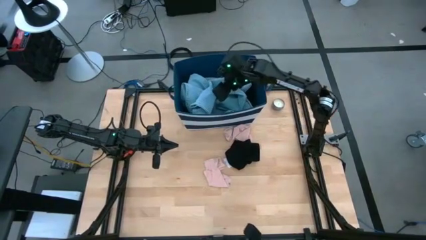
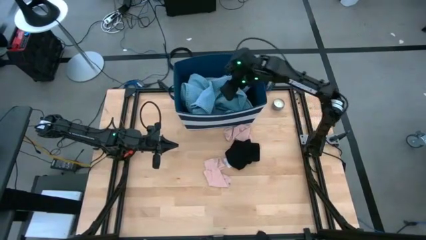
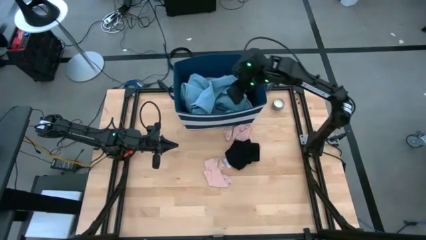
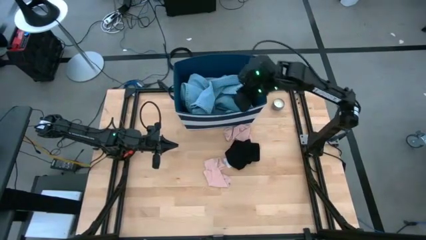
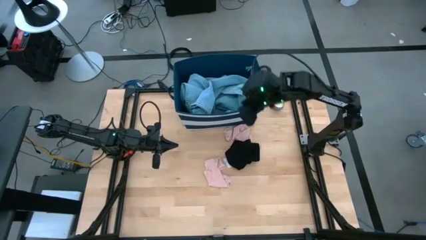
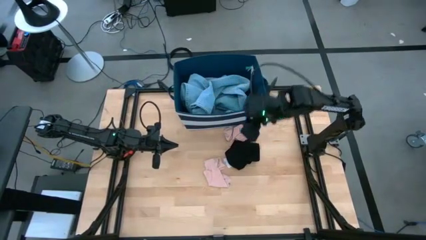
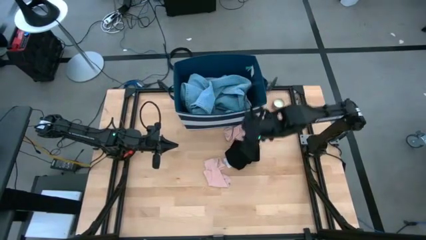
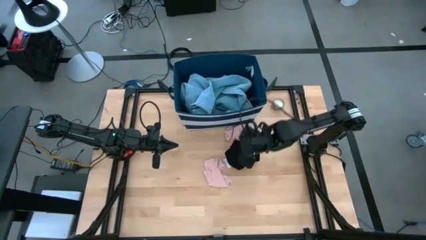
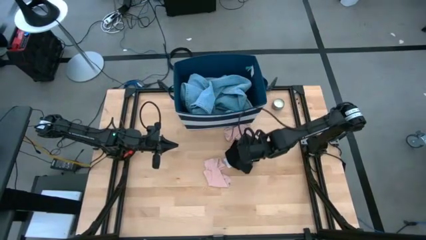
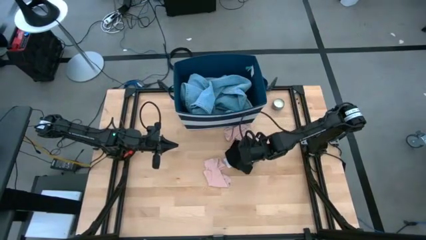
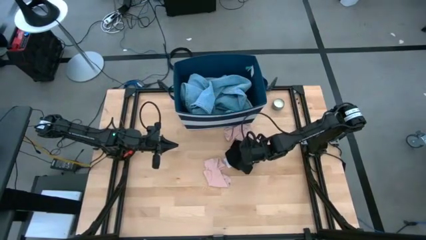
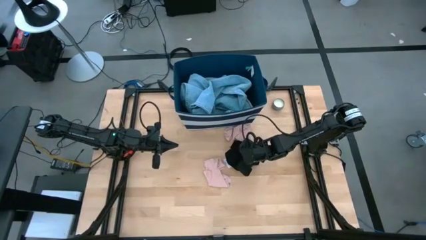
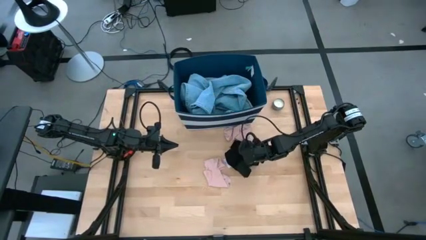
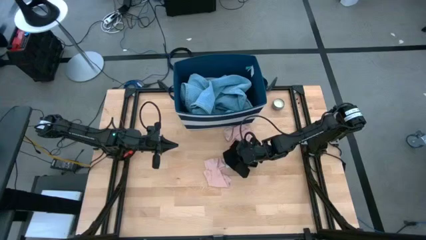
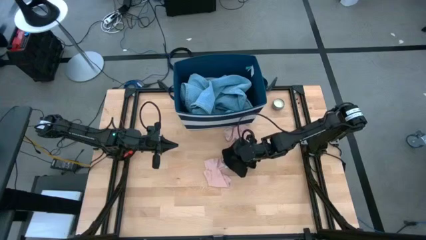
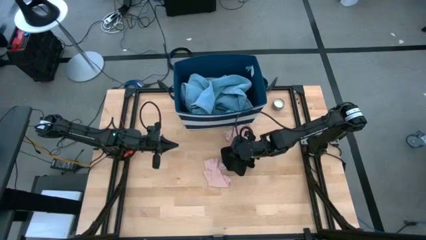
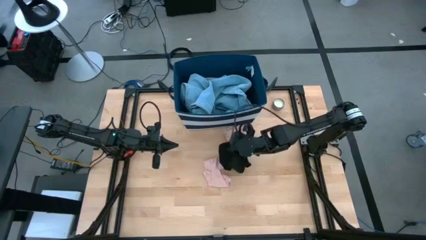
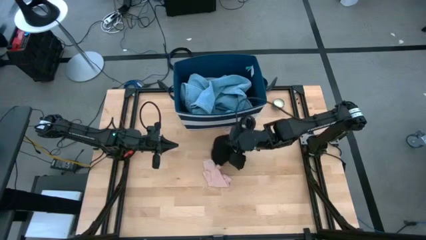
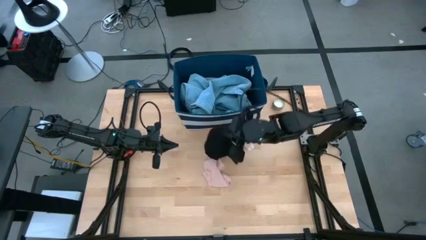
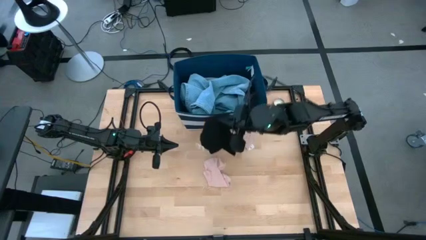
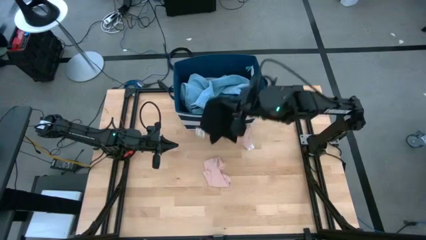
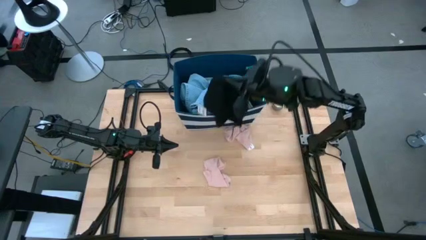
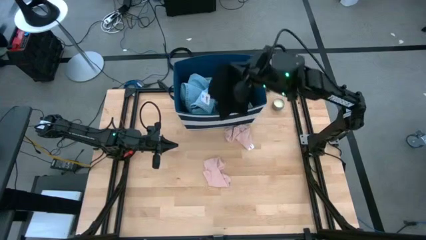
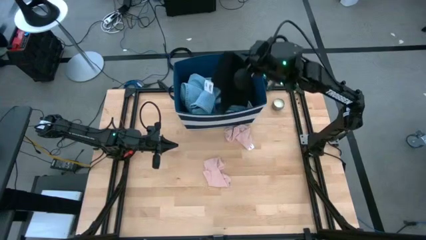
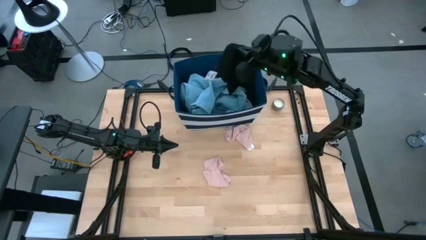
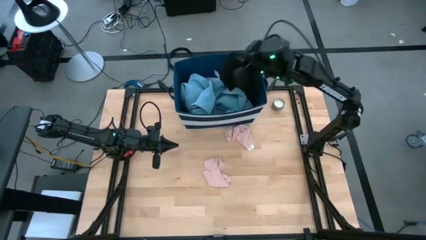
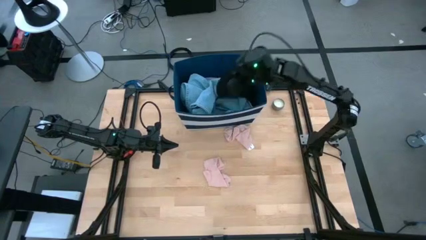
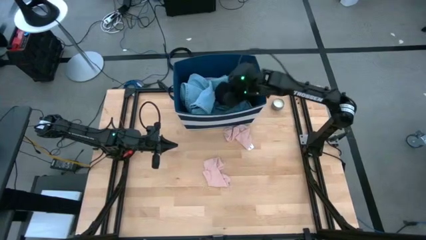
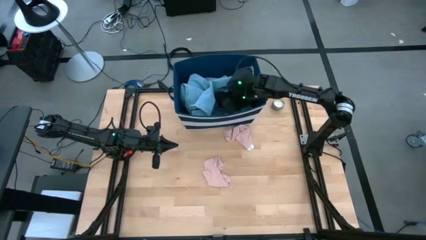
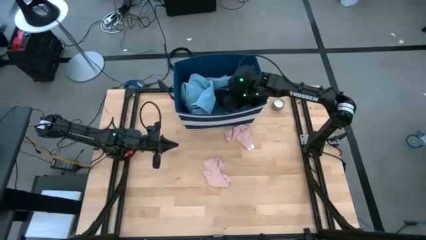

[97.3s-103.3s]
Task: Sort clothes
Put the black underwear into the blue organizer bin

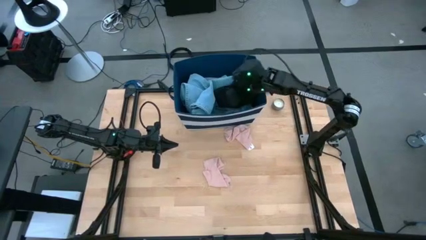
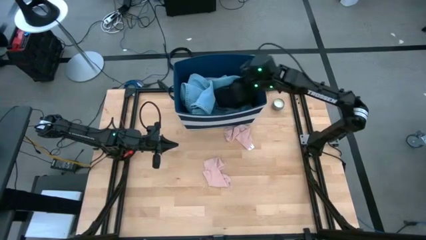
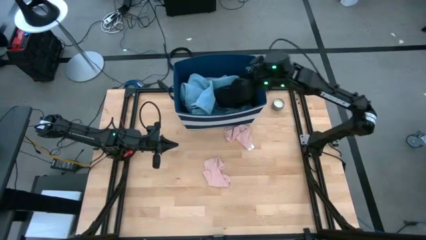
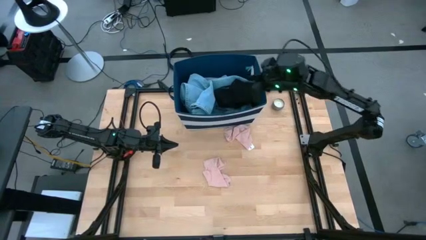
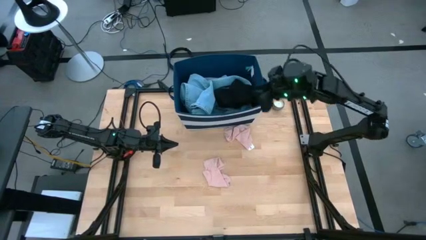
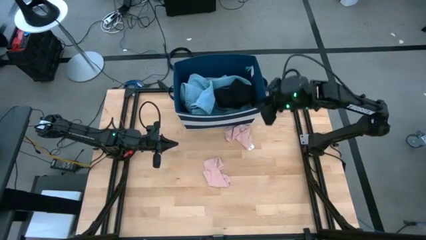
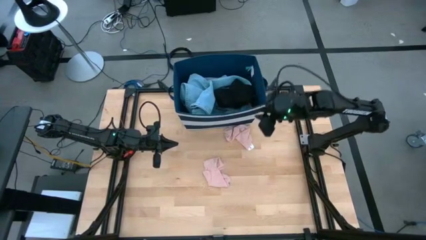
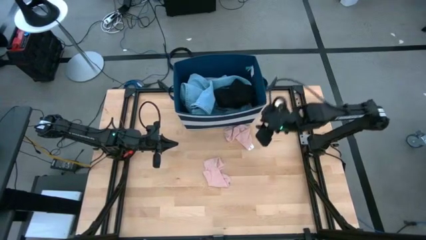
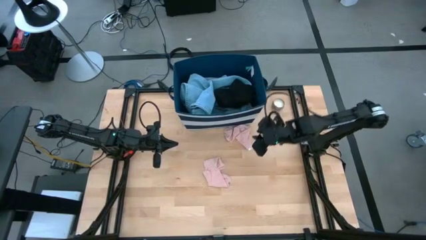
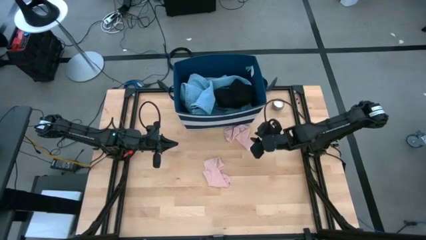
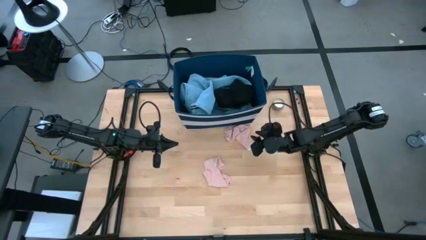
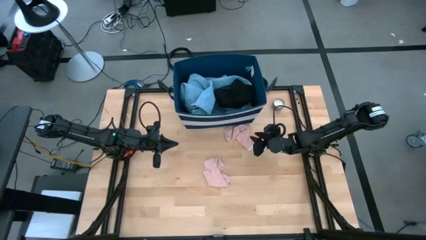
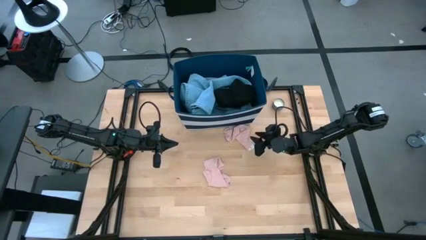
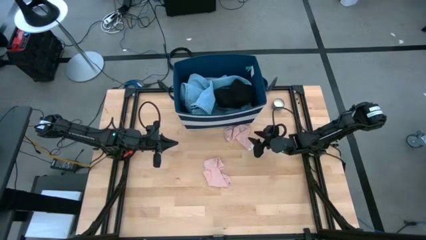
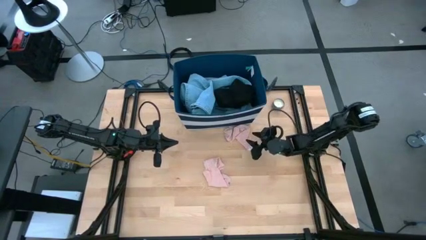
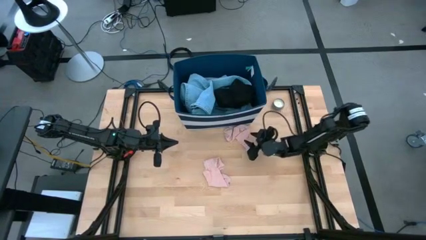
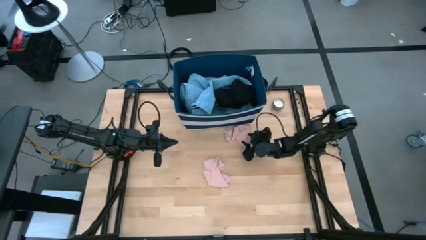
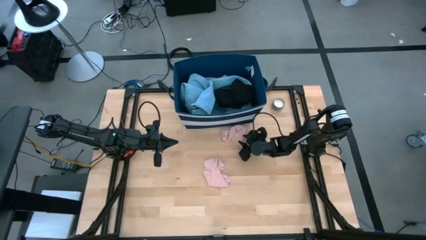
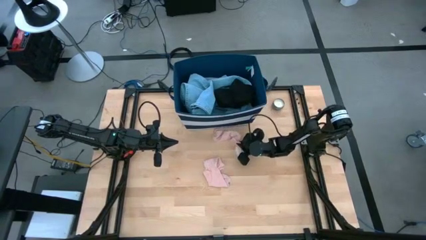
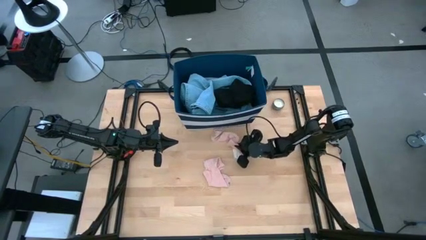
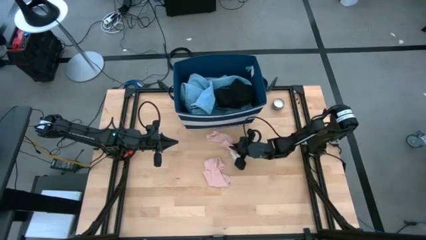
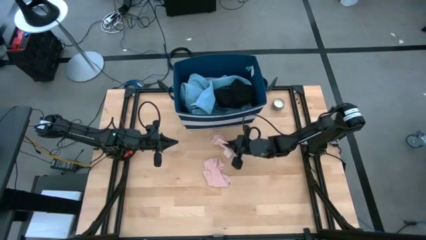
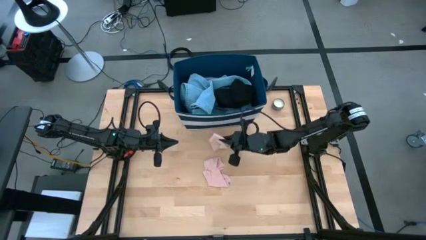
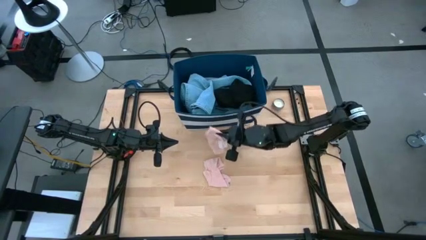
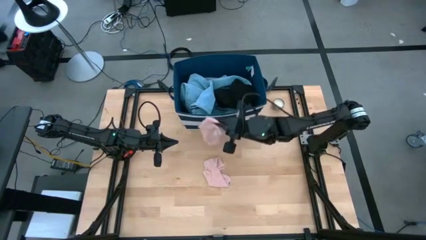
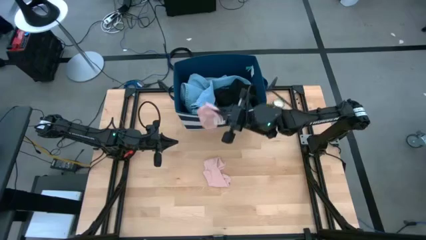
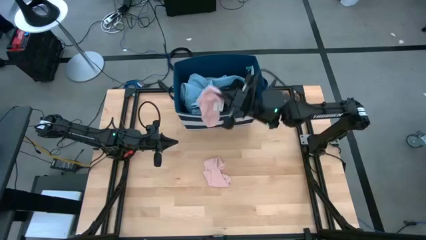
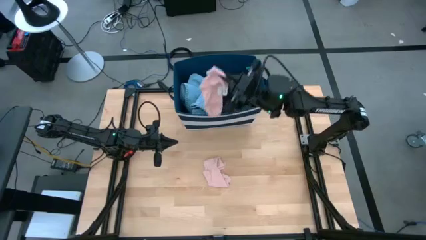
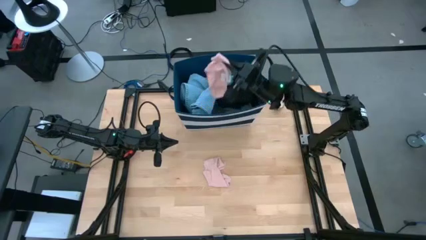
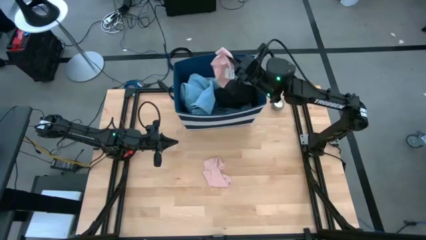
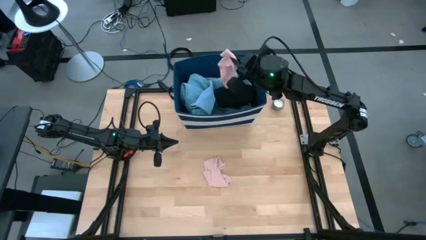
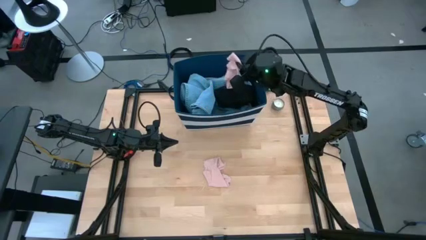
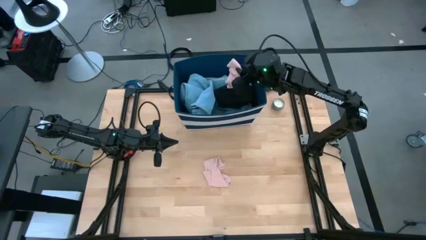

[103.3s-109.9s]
Put the top right pink sock into the blue organizer bin

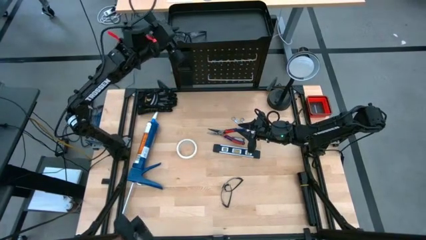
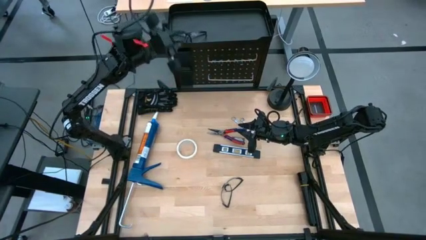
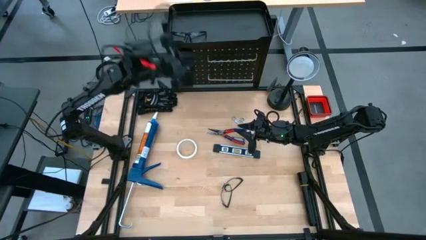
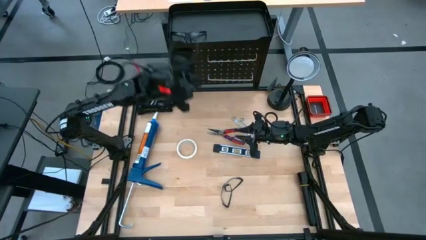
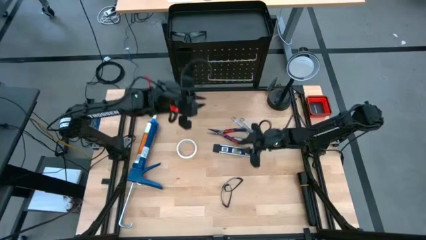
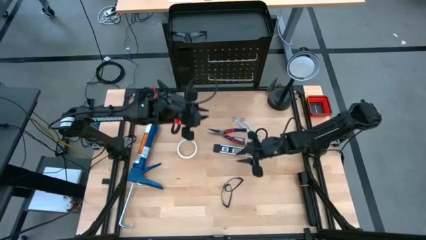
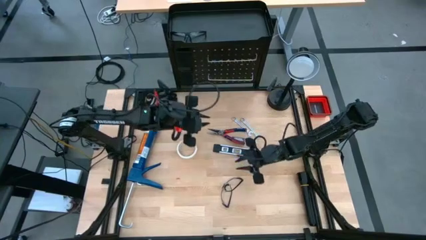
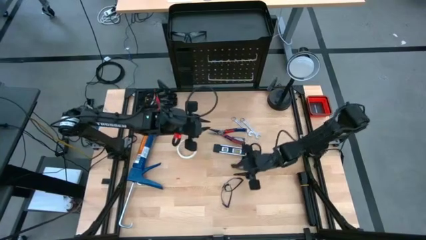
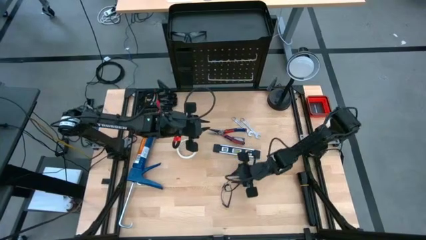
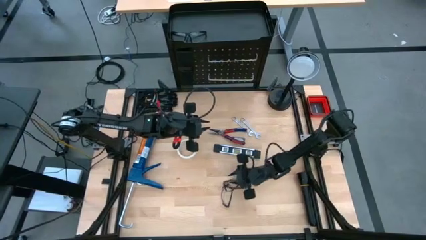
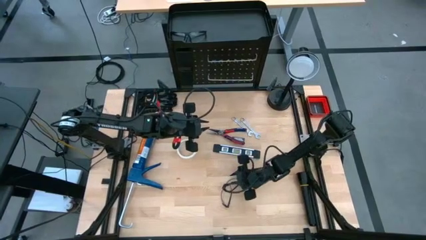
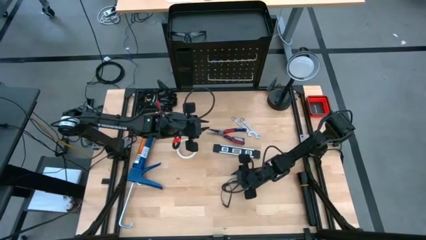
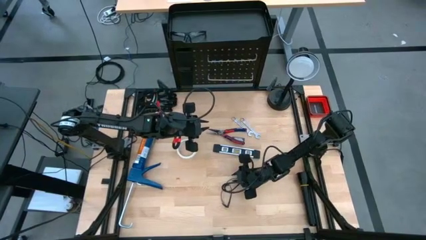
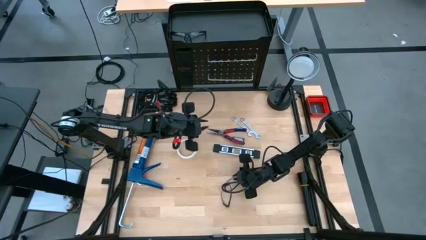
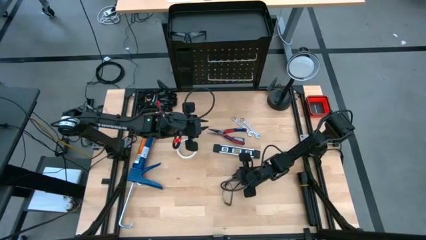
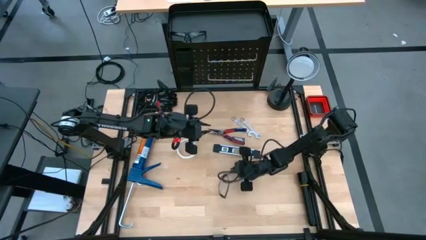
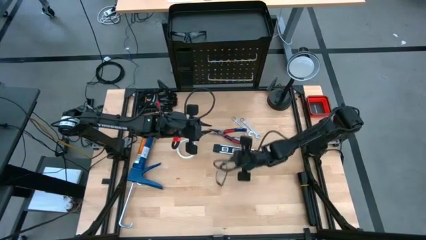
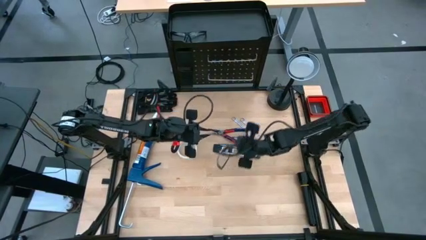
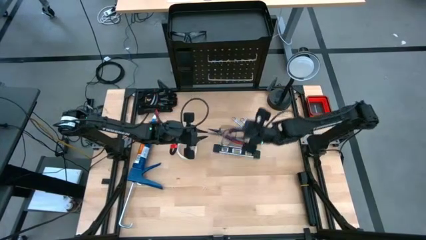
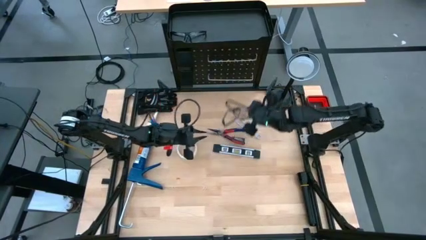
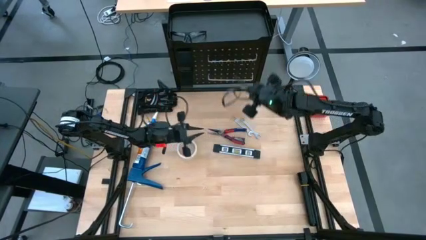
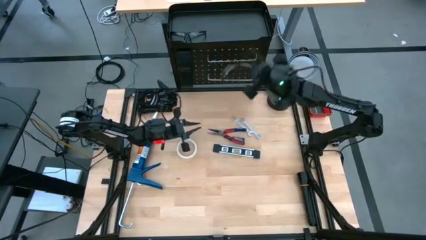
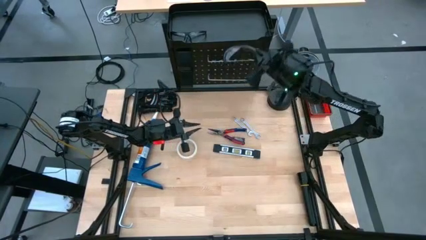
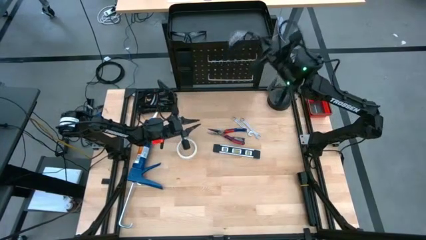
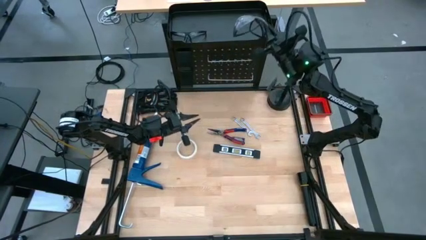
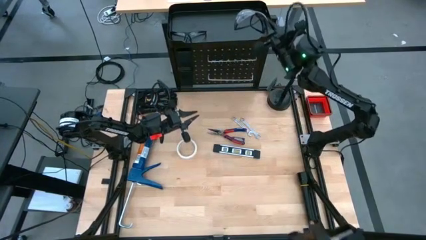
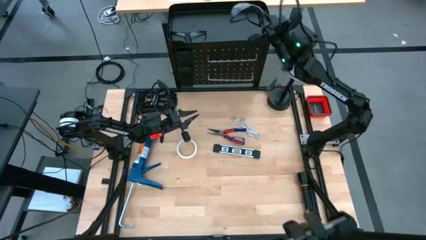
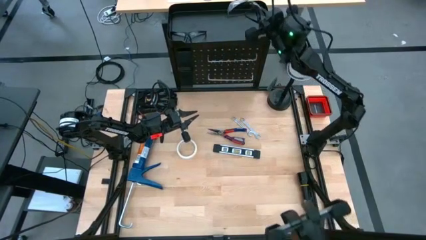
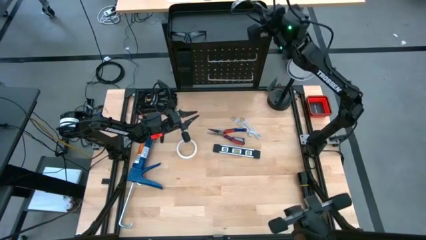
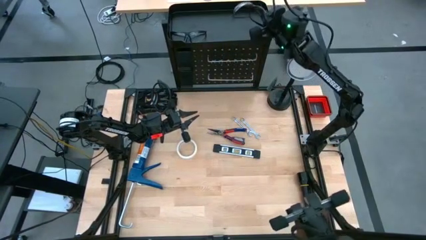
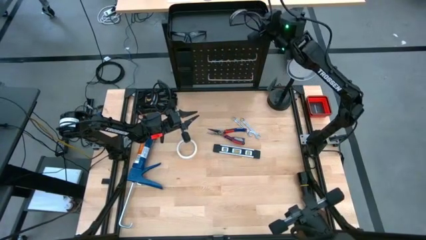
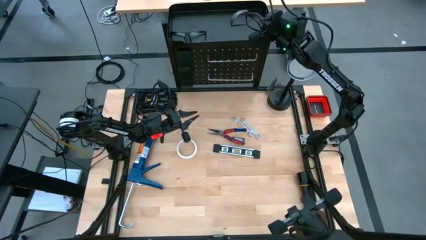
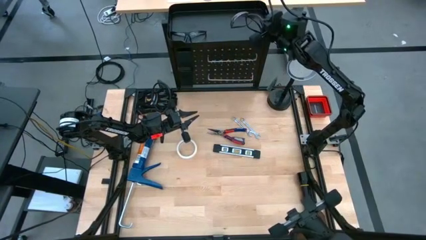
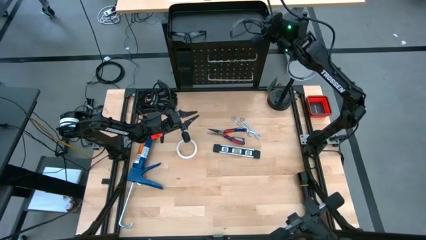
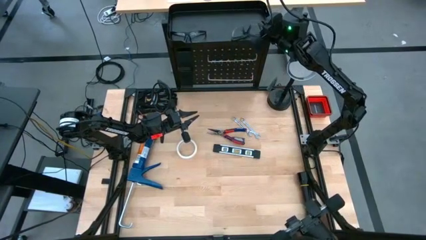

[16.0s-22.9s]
Task: Hang tools onto peg board
Put the black safety glasses on the black peg board
